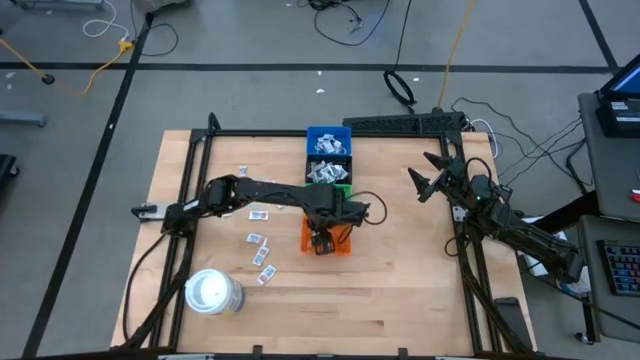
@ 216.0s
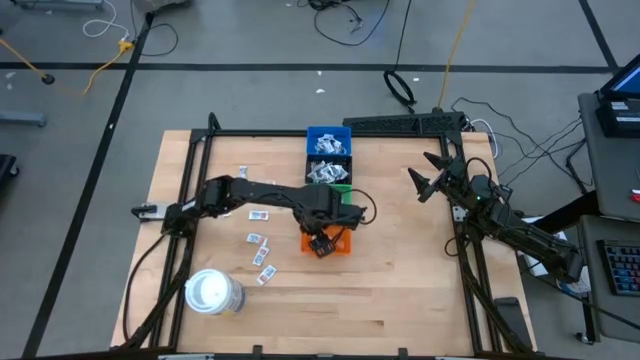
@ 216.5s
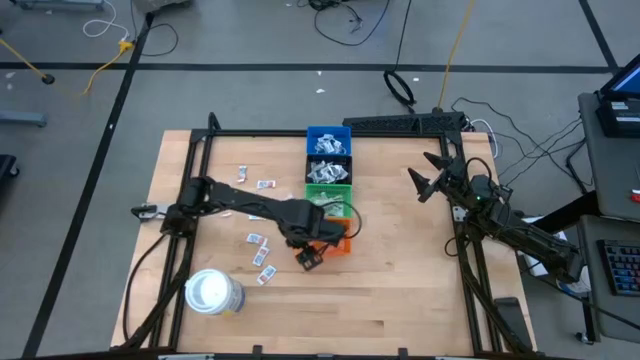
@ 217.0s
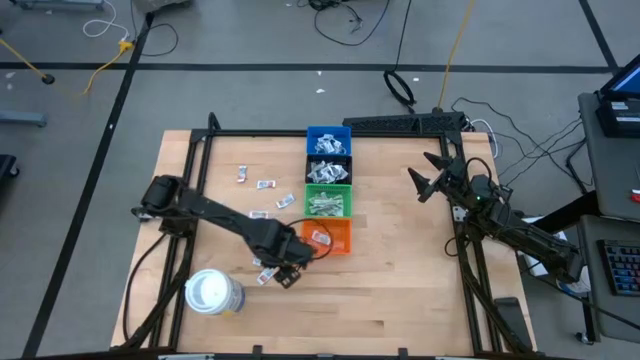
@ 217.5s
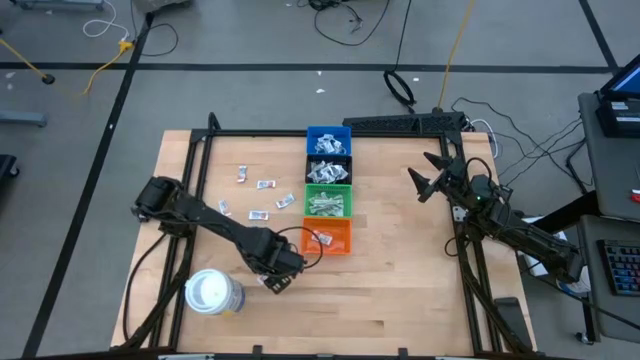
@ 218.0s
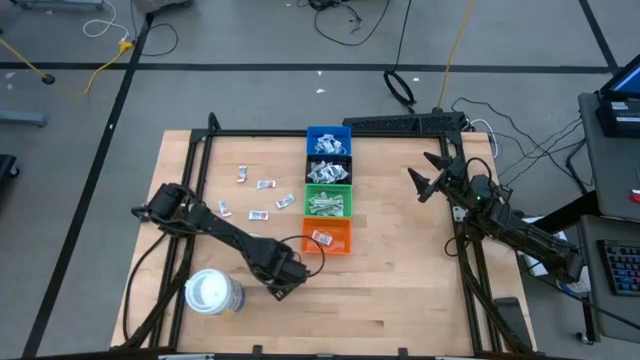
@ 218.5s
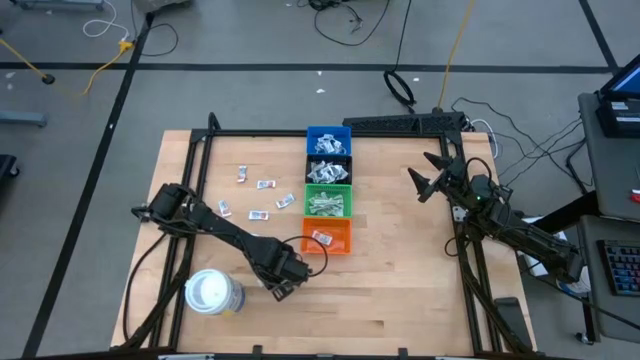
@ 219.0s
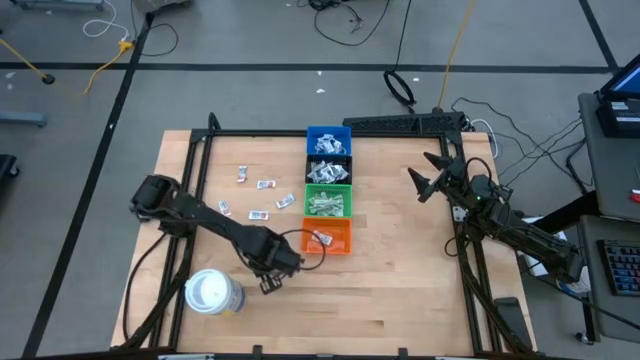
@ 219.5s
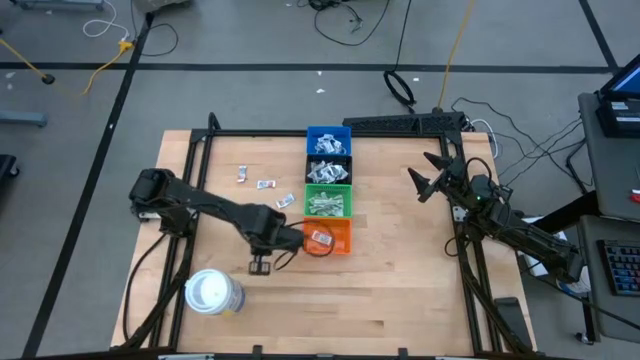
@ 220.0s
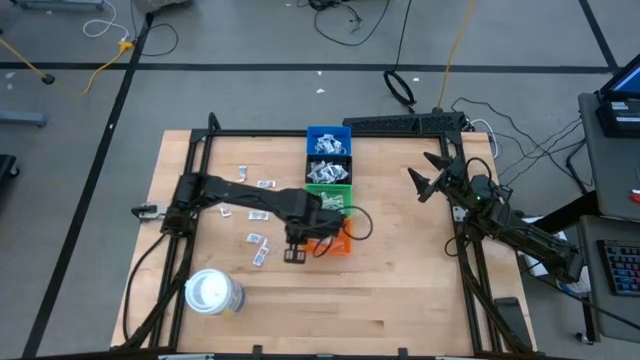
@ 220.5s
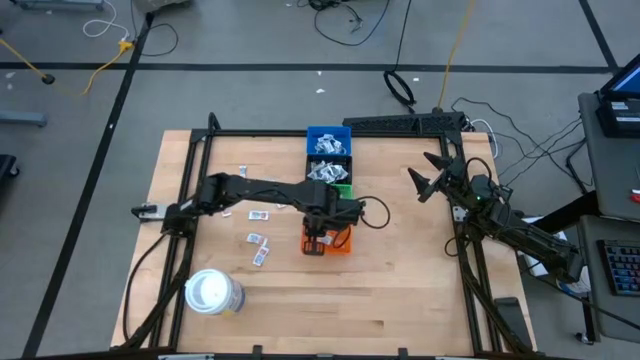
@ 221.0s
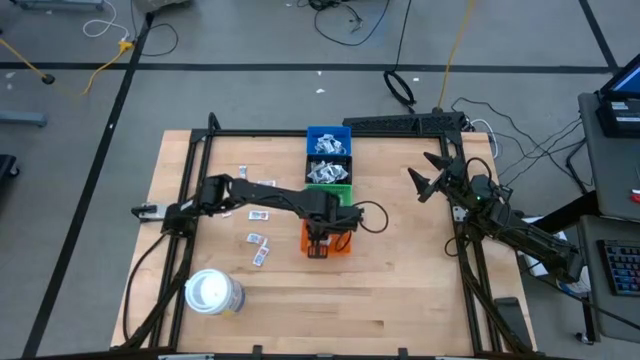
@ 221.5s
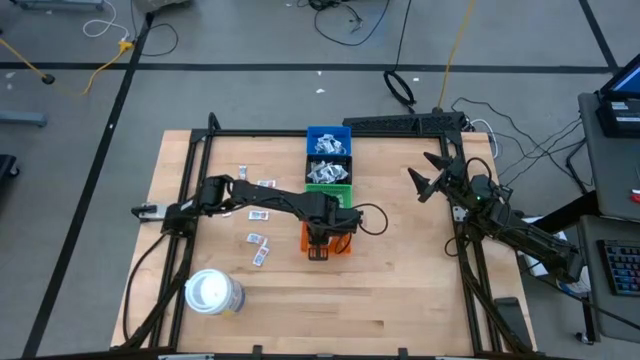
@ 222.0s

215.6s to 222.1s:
Task: Pick & Place First Aid Supplies
Put the orange ointment pack into the orange bin

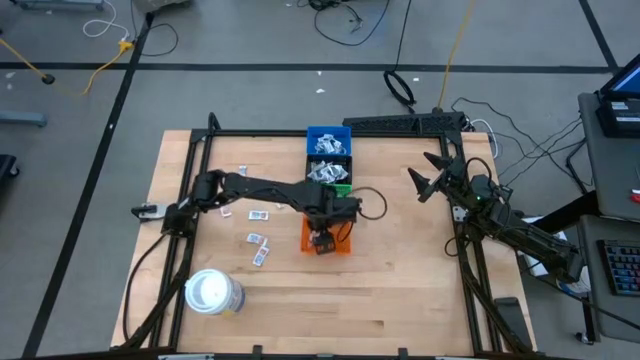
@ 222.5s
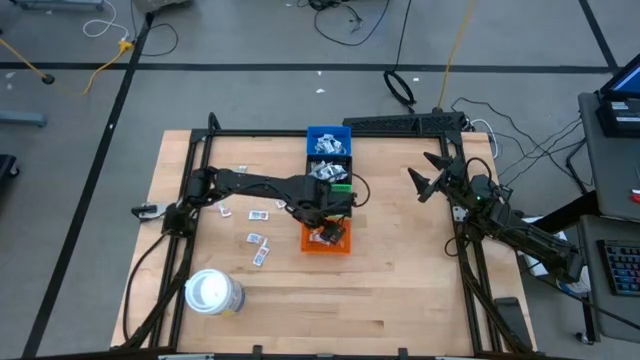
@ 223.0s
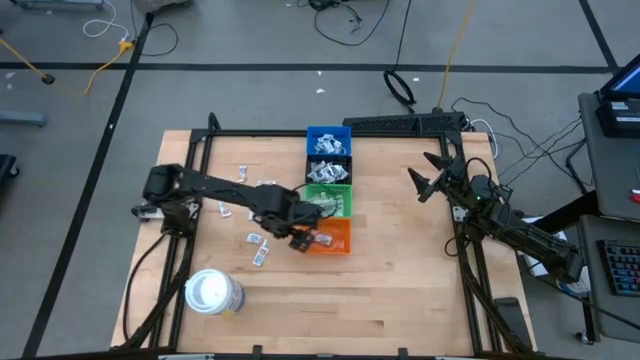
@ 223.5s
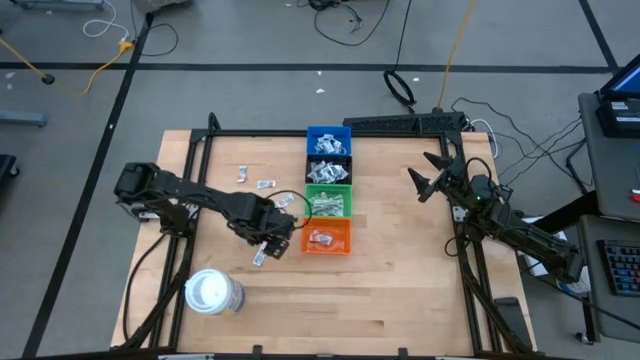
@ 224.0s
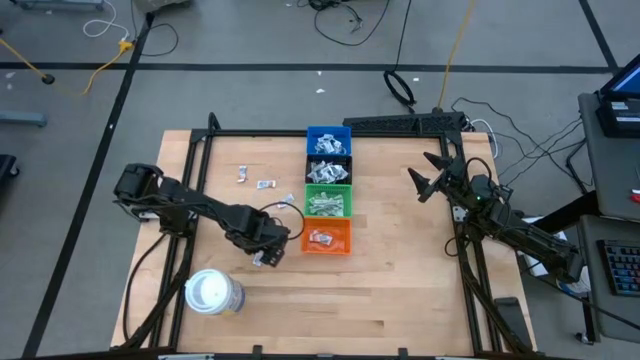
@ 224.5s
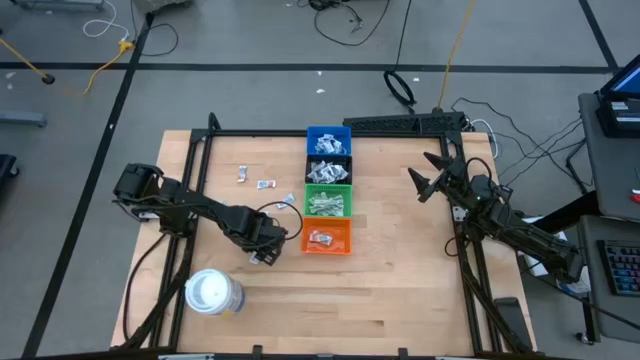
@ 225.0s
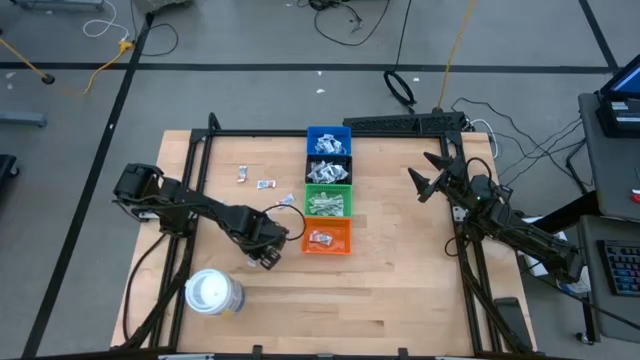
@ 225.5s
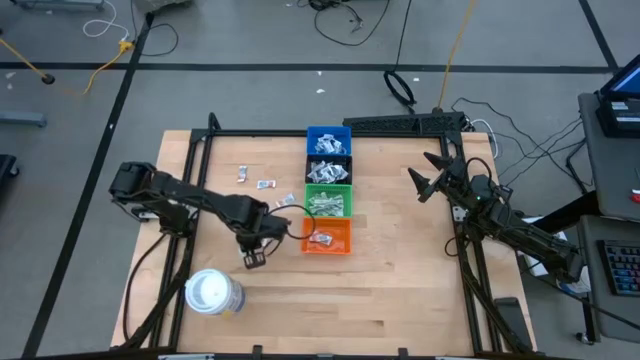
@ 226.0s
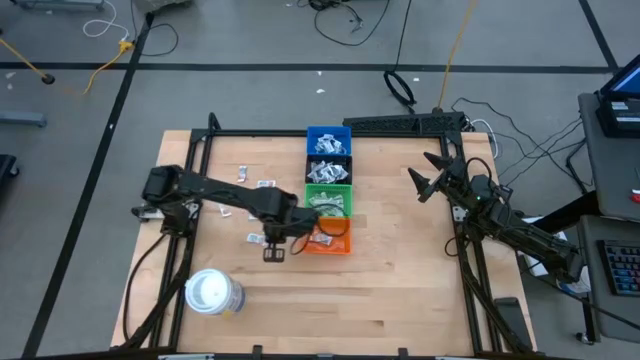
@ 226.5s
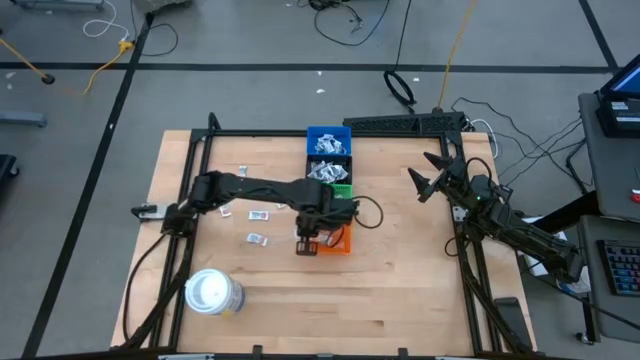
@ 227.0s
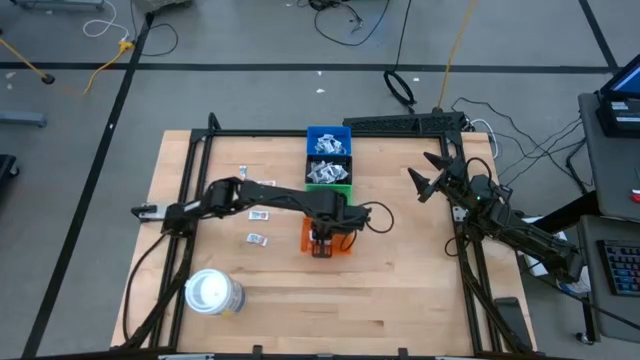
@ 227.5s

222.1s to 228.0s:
Put the orange ointment pack into the orange bin

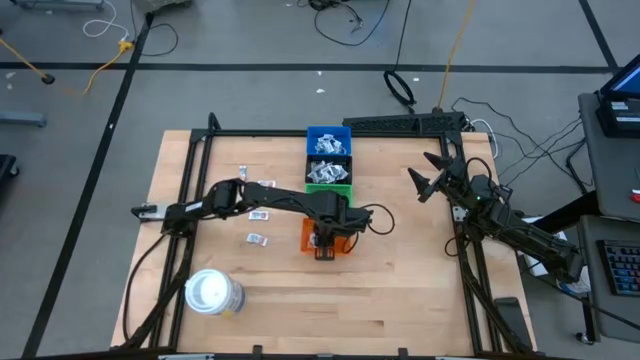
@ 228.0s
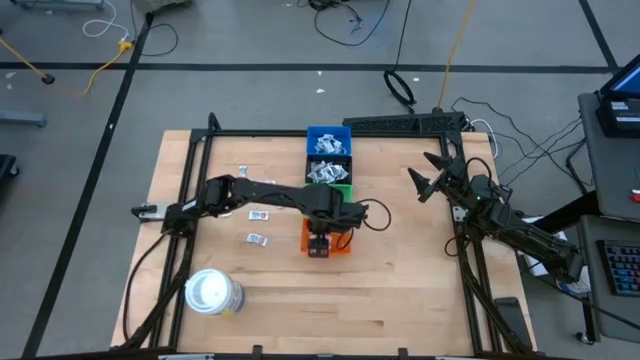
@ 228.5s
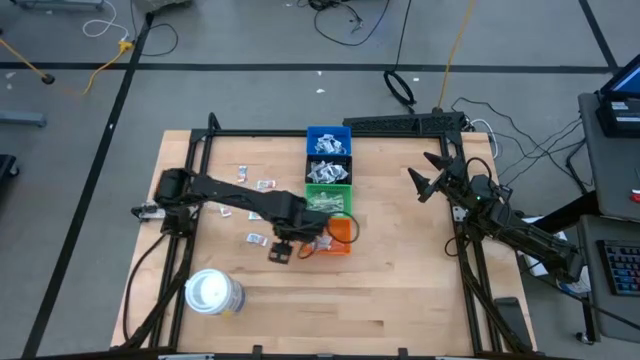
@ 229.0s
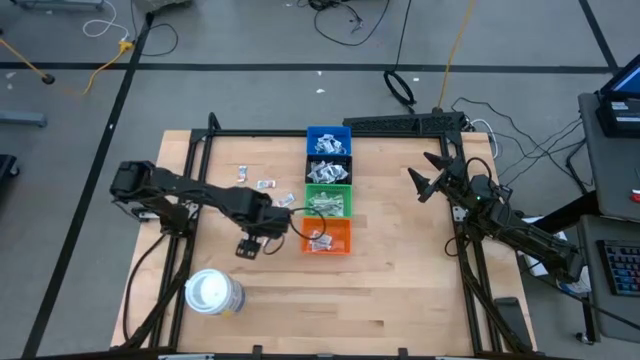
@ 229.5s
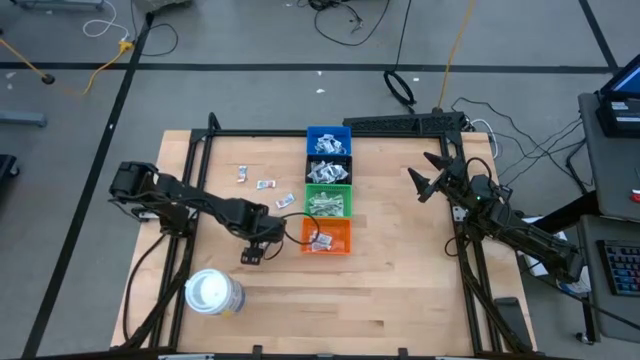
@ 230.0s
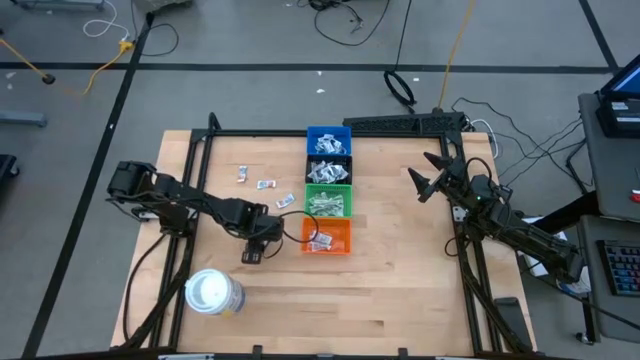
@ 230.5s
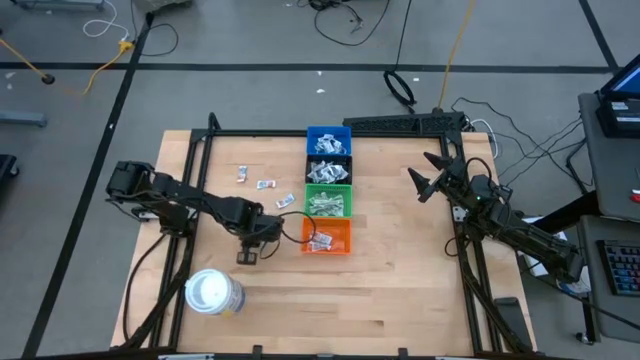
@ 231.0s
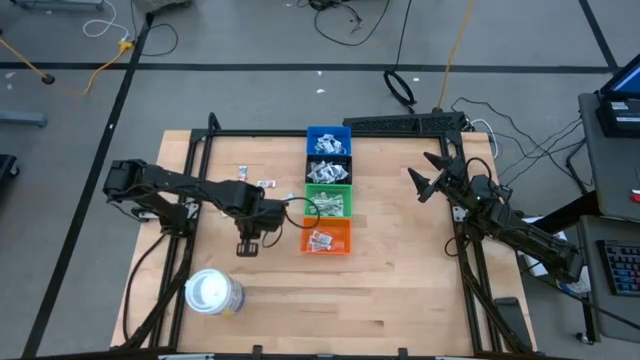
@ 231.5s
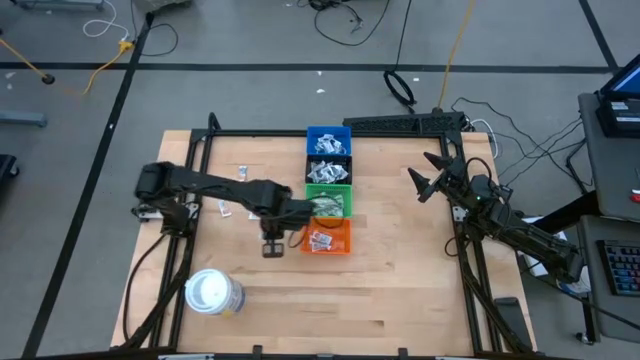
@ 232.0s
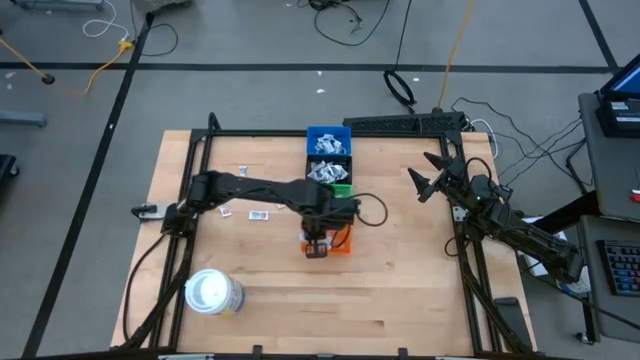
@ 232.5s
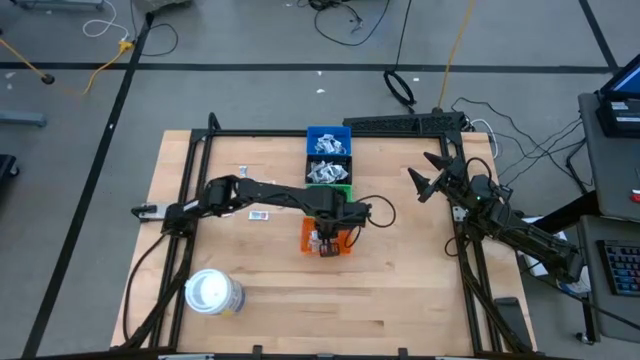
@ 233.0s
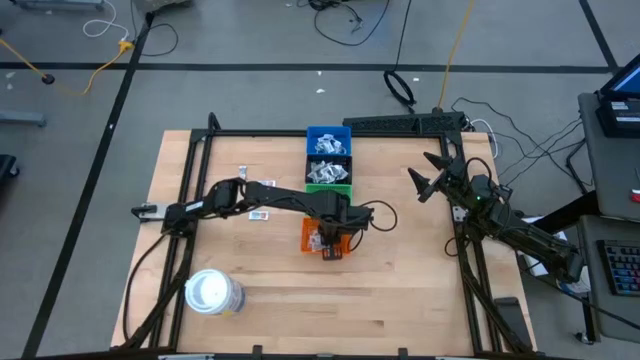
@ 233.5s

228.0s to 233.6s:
Put the orange ointment pack into the orange bin

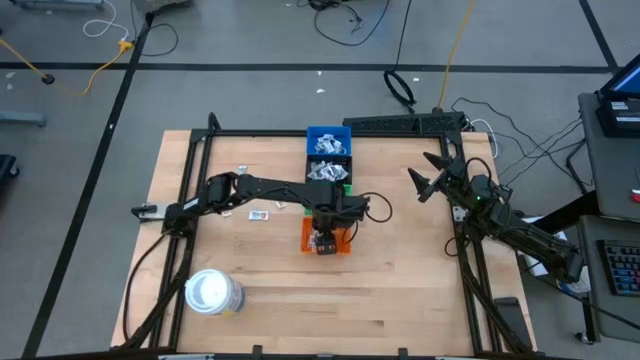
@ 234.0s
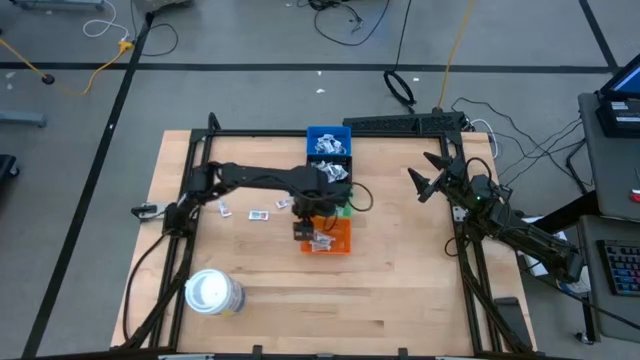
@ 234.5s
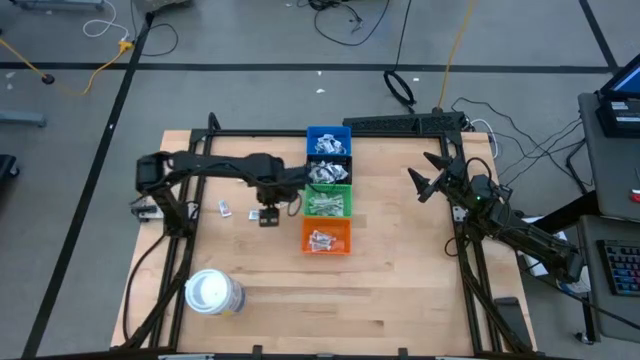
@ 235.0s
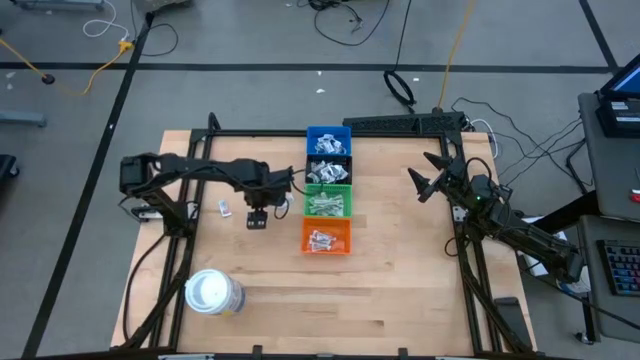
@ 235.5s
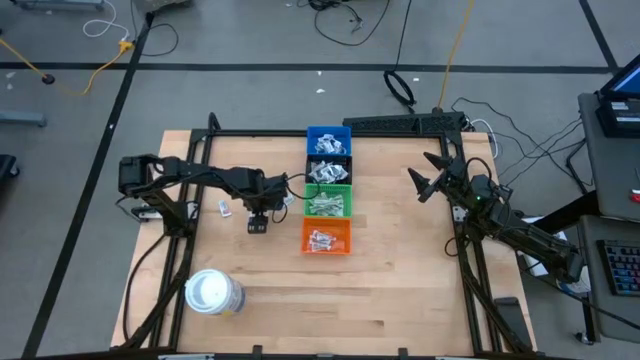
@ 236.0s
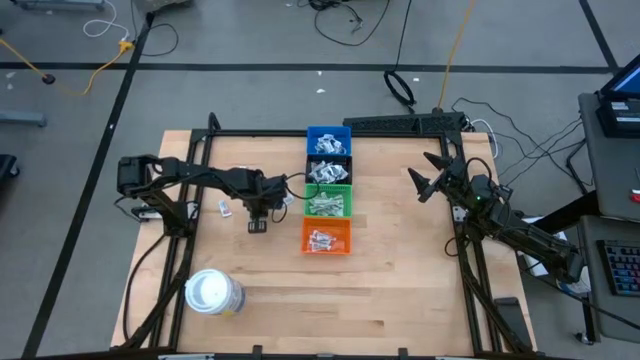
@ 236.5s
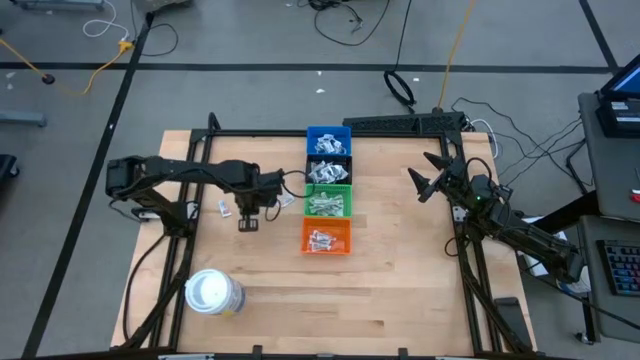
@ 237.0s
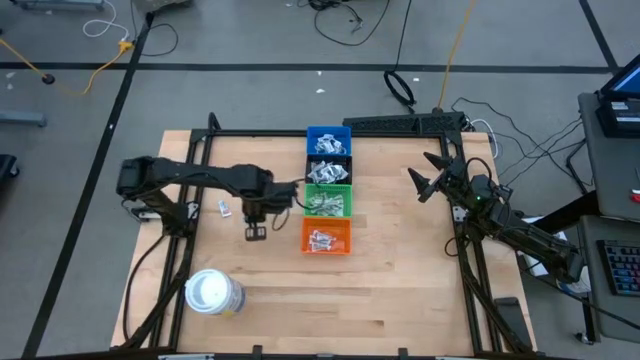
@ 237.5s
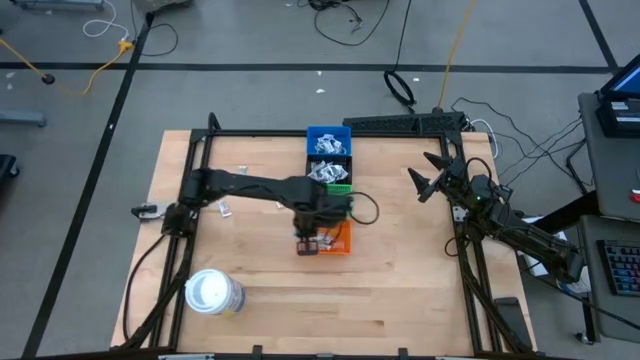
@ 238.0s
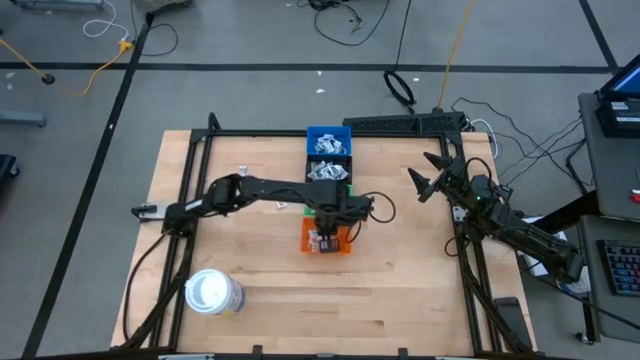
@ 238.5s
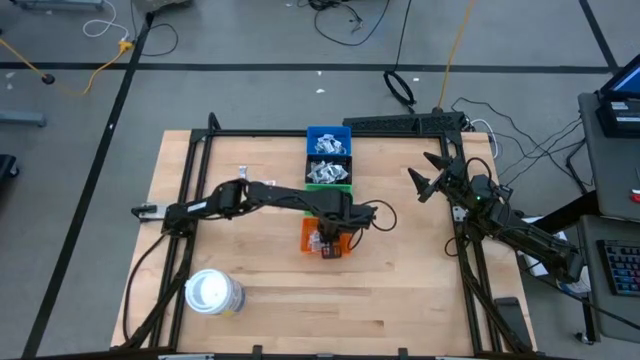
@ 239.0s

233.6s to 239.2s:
Put the orange ointment pack into the orange bin
